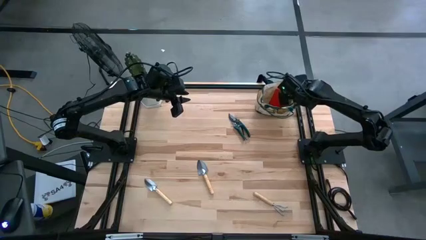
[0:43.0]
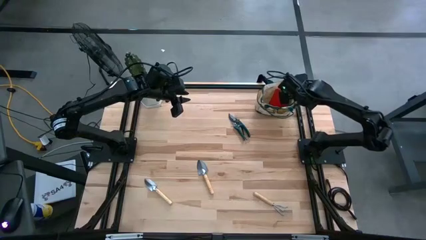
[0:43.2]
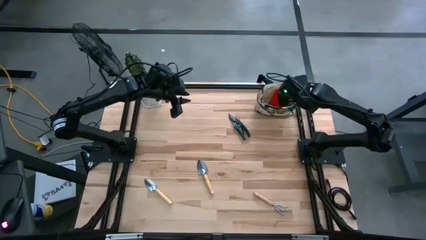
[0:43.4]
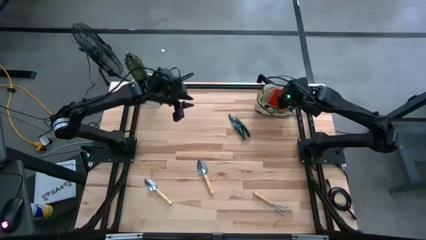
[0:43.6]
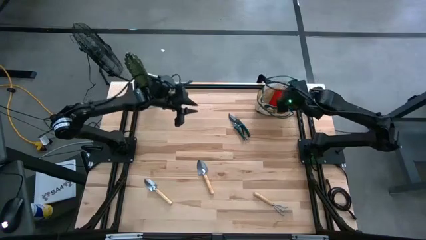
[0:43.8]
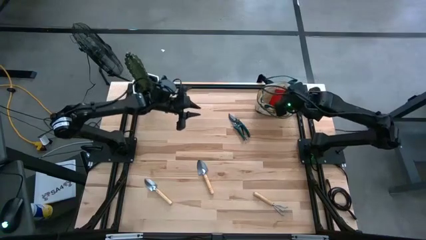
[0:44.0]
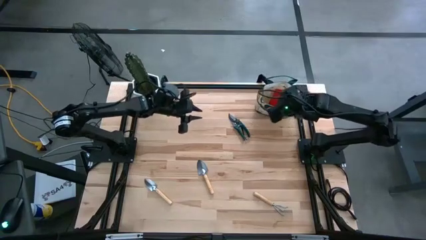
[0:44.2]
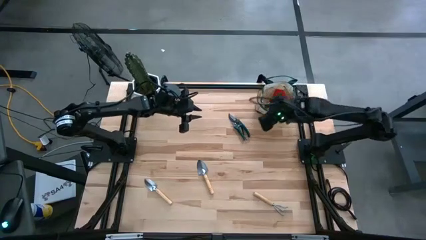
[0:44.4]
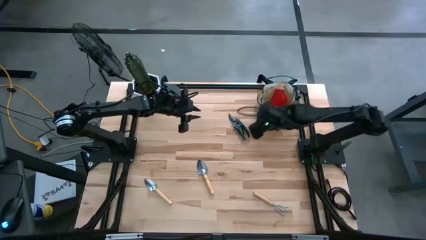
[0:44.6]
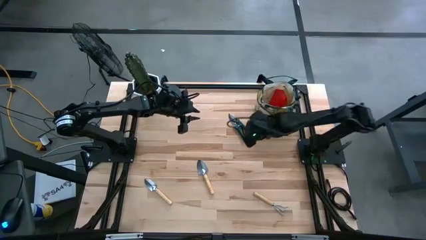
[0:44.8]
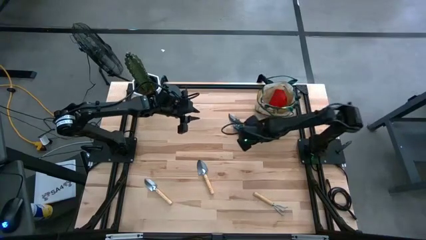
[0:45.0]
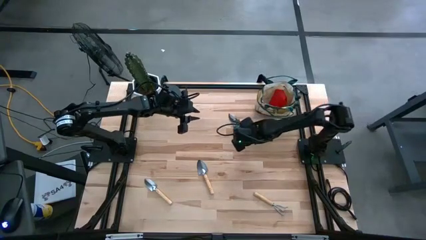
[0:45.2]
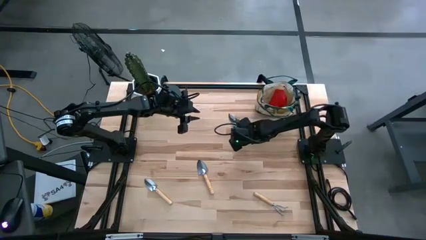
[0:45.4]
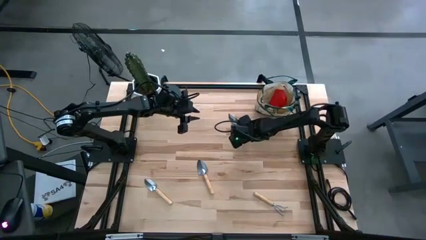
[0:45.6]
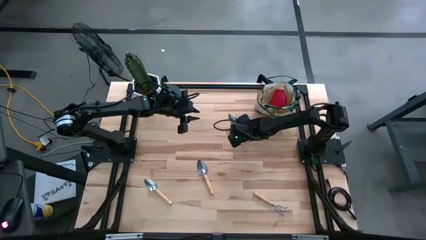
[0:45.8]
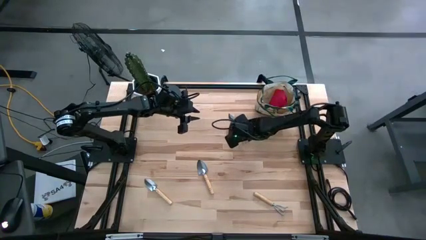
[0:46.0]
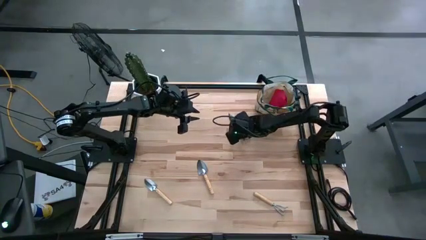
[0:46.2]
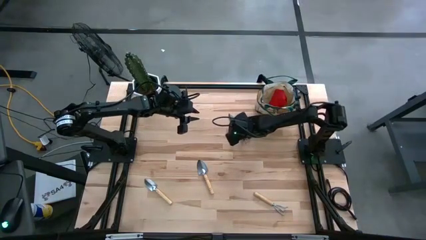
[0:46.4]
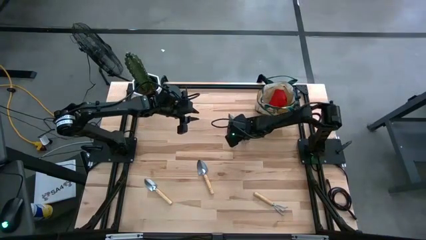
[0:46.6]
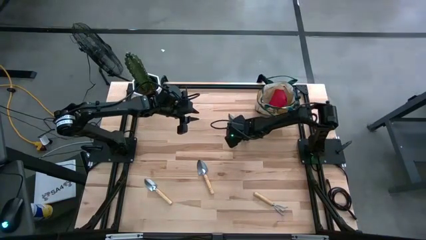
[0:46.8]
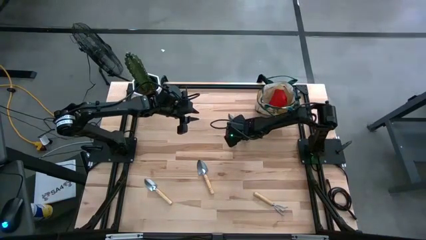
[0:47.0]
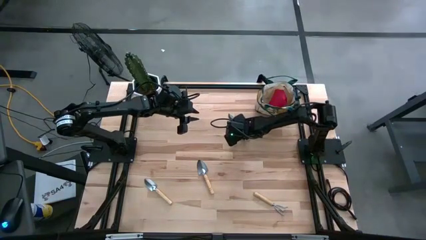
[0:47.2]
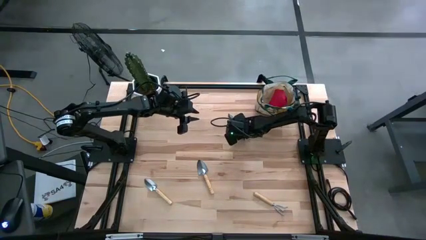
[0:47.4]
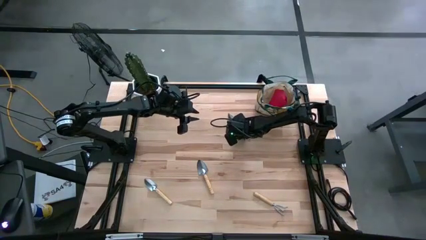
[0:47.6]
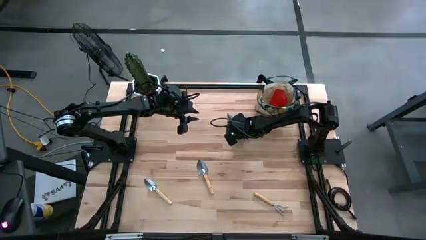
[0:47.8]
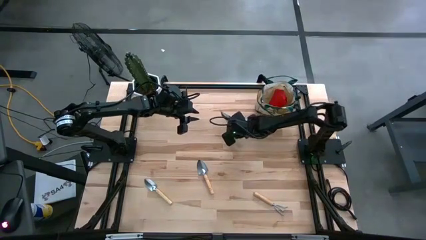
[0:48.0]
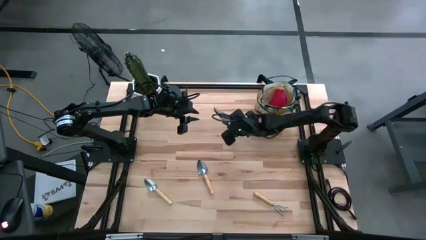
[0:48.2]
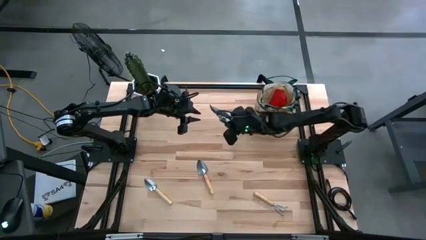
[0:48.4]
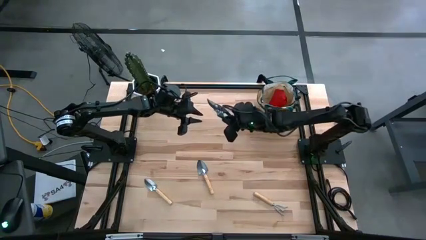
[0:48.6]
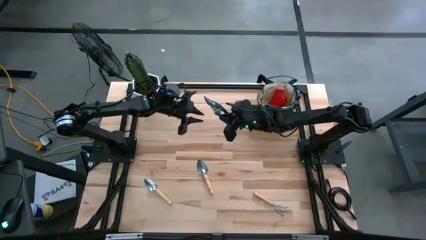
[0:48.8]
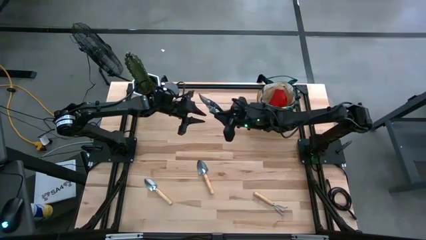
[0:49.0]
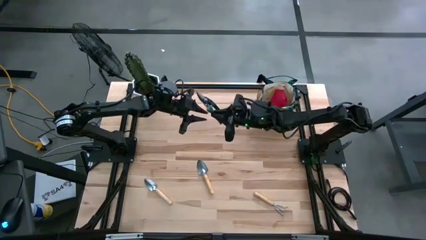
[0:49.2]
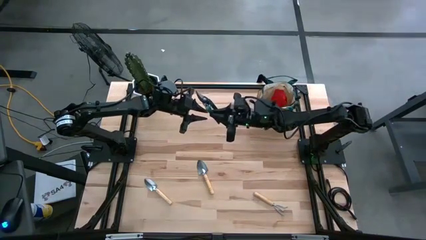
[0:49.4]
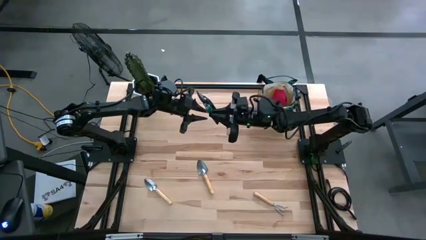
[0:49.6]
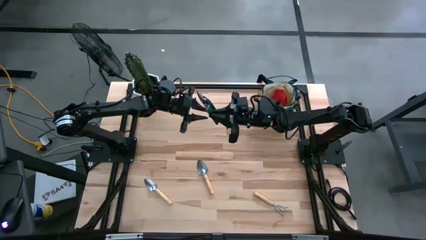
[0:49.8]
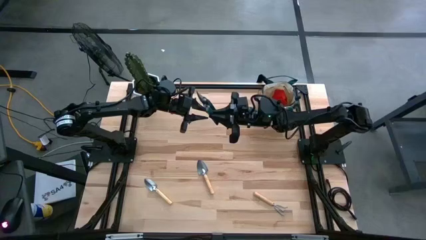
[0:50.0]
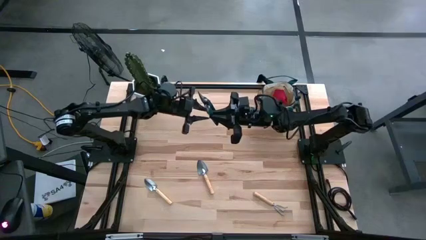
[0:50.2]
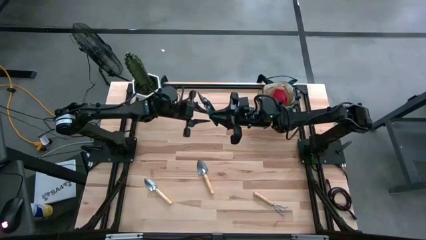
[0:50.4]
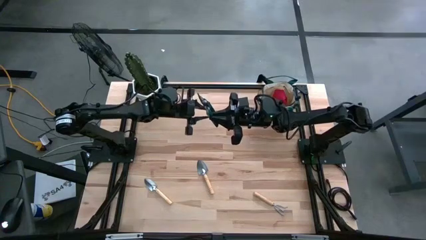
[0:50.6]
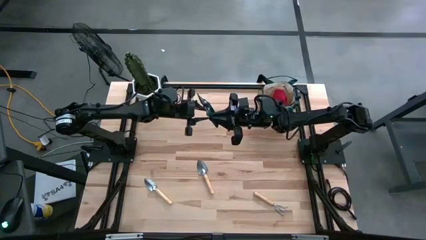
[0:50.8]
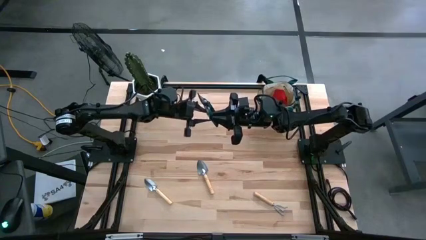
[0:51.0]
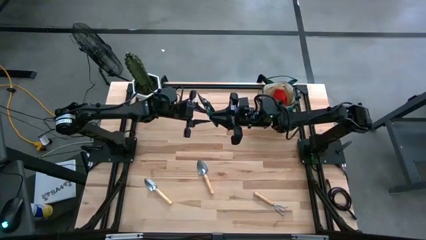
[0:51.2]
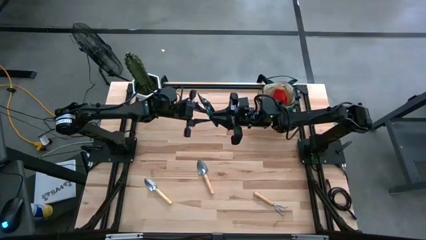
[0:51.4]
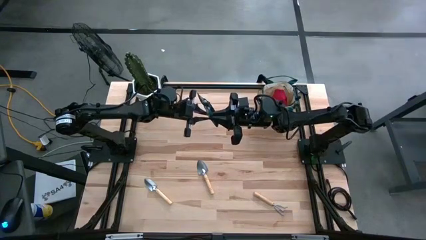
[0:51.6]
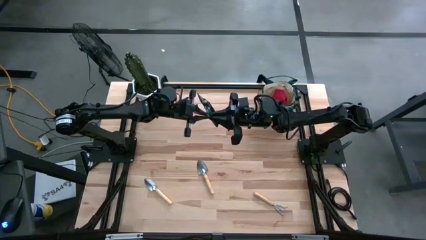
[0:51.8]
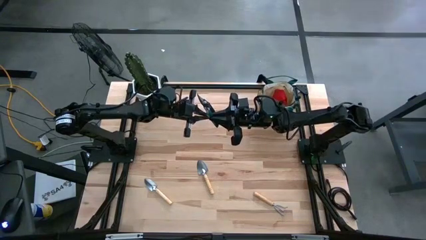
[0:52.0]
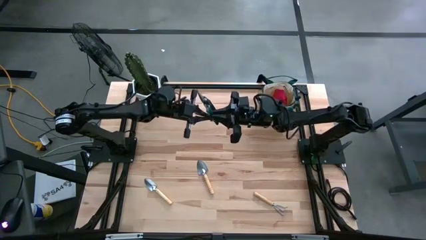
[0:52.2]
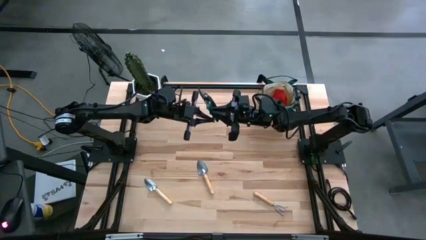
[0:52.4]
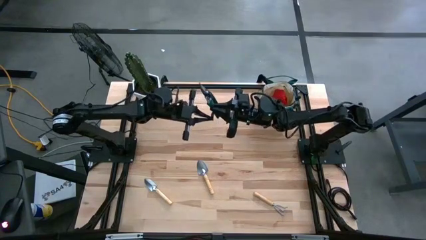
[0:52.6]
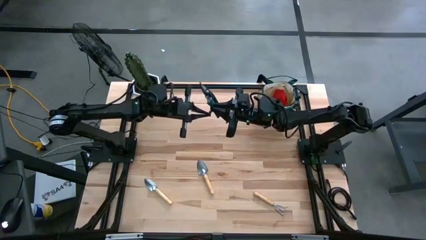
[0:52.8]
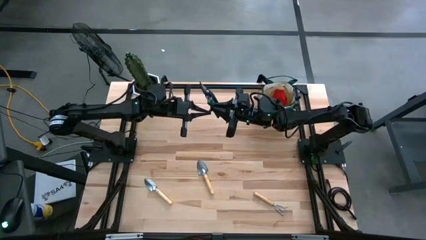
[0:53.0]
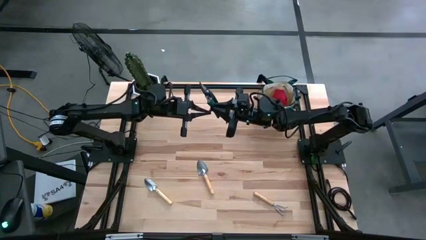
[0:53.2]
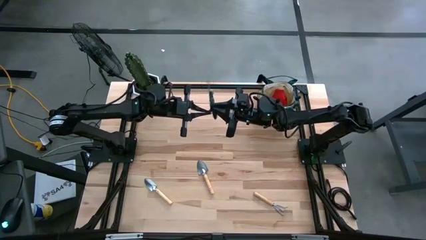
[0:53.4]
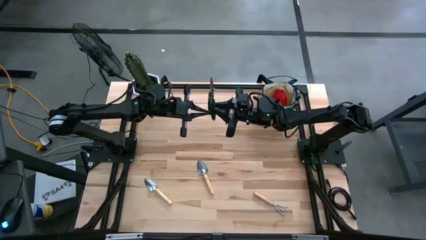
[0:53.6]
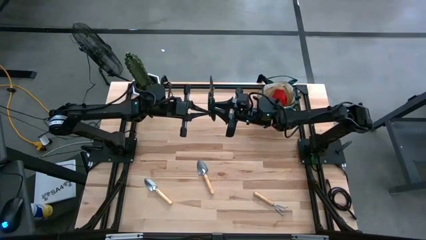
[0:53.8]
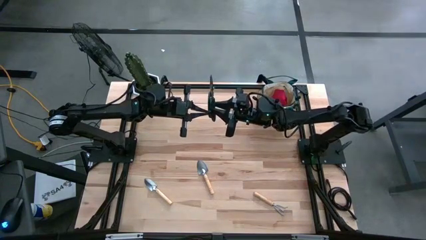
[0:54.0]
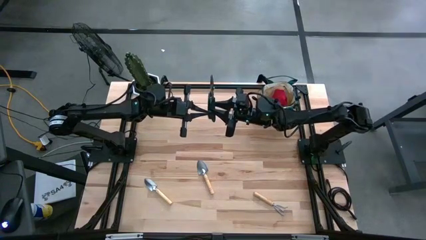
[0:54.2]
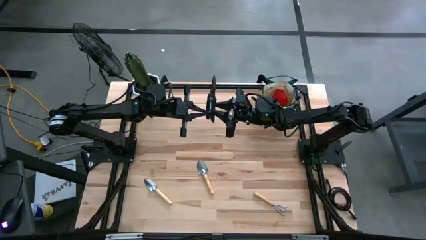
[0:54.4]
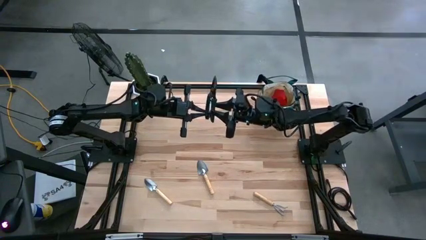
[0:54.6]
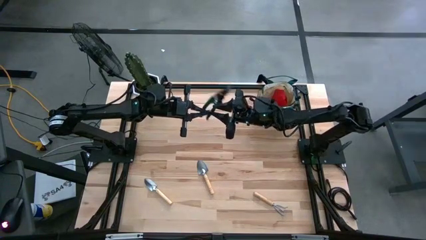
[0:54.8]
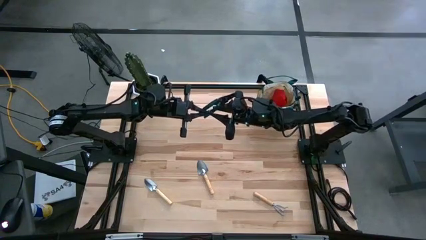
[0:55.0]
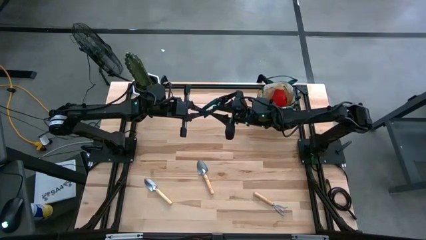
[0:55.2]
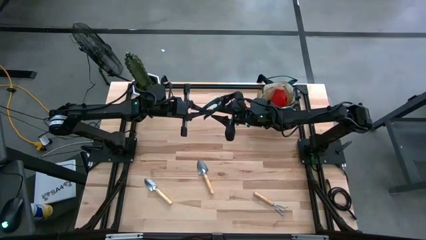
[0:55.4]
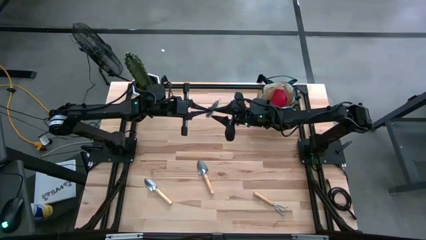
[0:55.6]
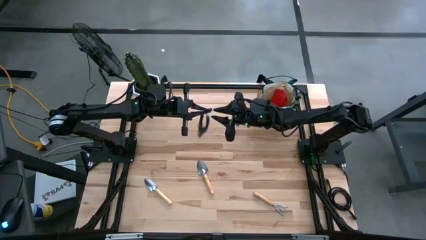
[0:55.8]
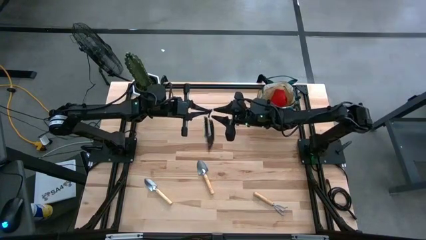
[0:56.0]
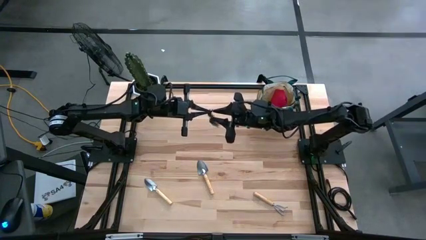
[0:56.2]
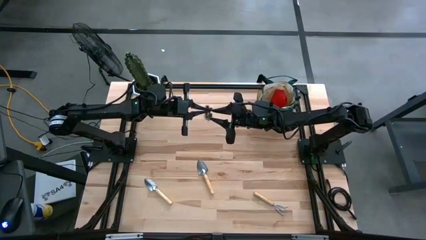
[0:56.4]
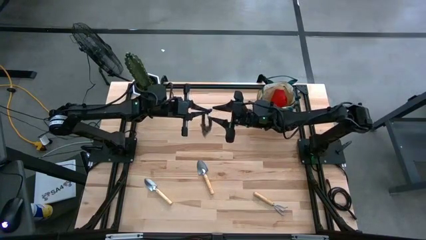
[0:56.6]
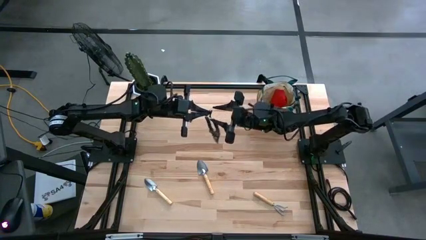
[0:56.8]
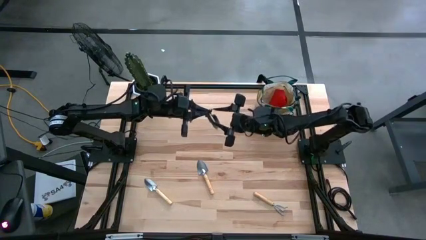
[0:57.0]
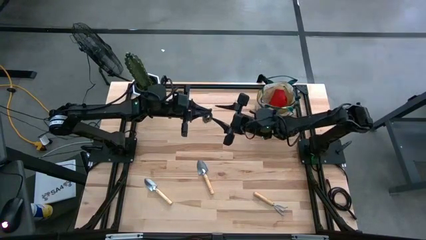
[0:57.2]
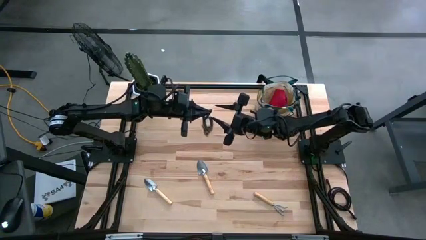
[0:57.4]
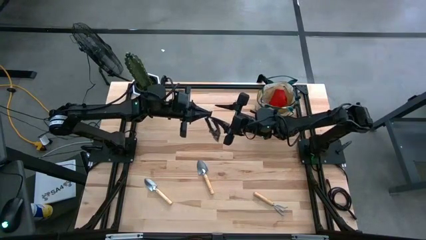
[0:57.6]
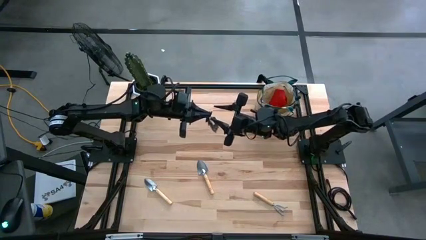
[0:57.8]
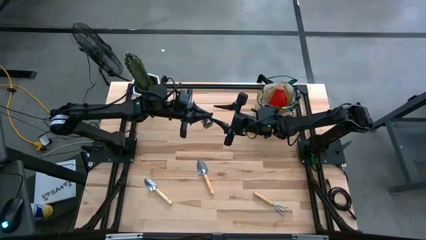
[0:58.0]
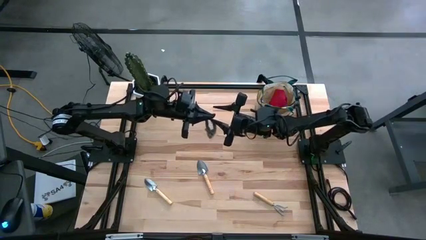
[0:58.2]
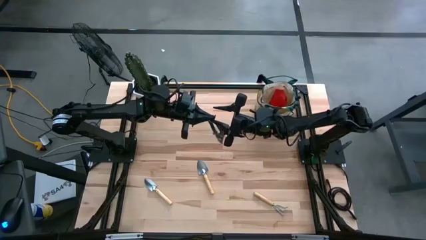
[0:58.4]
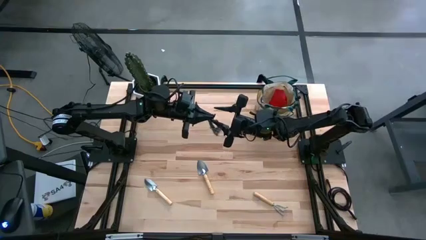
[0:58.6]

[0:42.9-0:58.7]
Task: Pick & Place Garden tools in Gardening bag
Put the green shear scissor into the gardening bag
